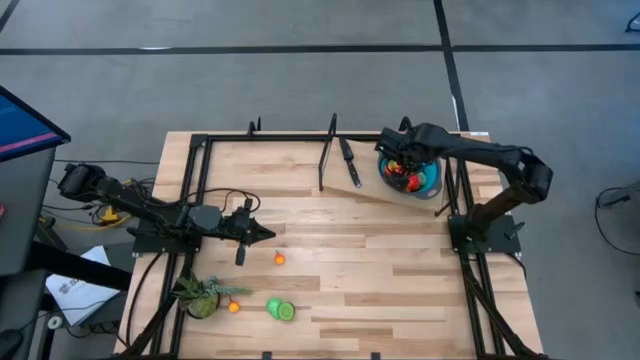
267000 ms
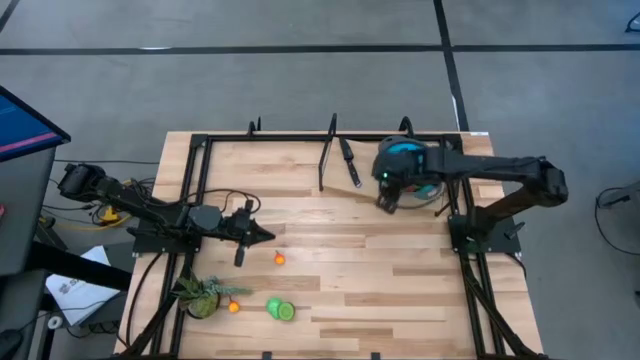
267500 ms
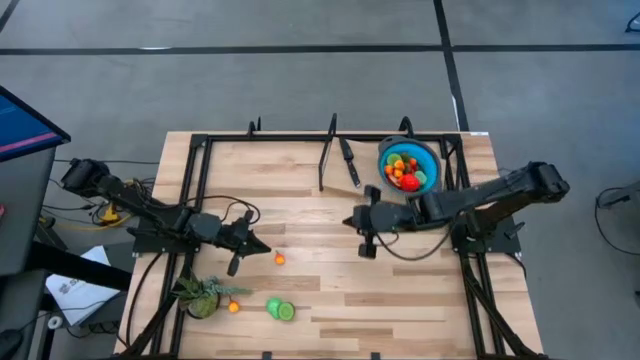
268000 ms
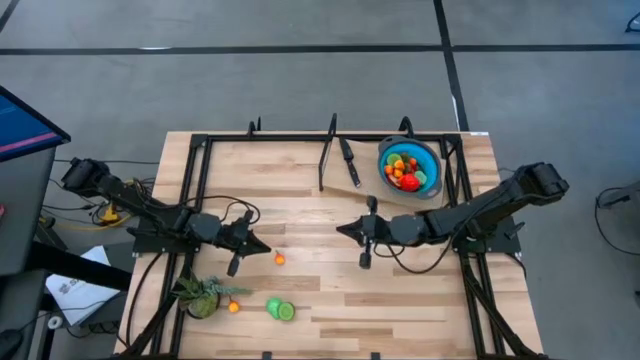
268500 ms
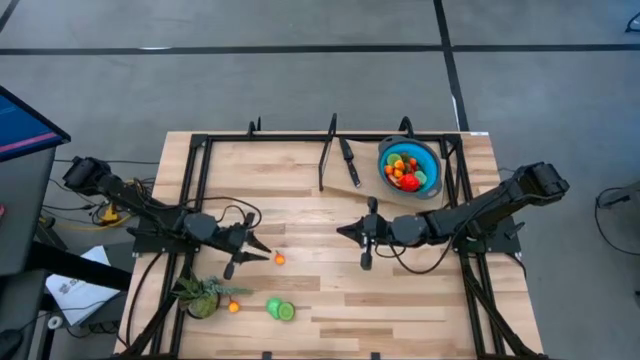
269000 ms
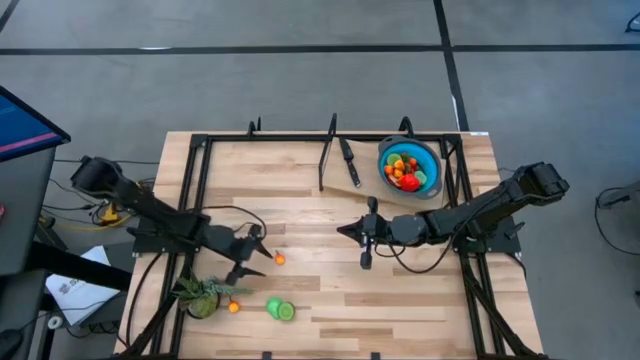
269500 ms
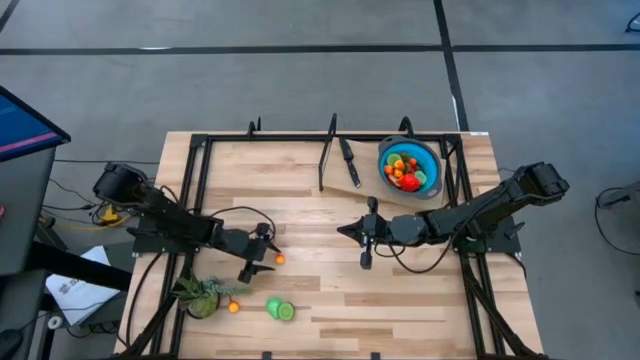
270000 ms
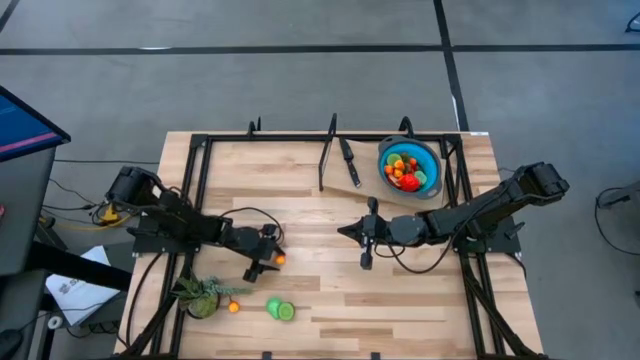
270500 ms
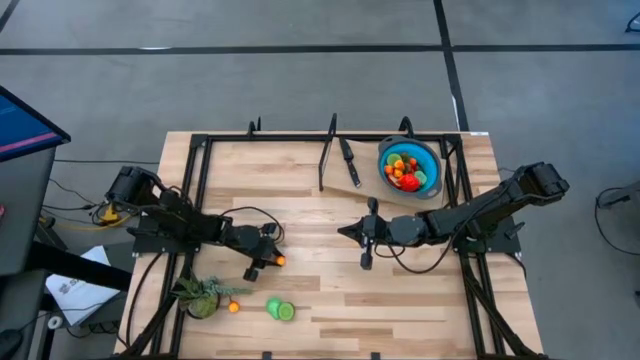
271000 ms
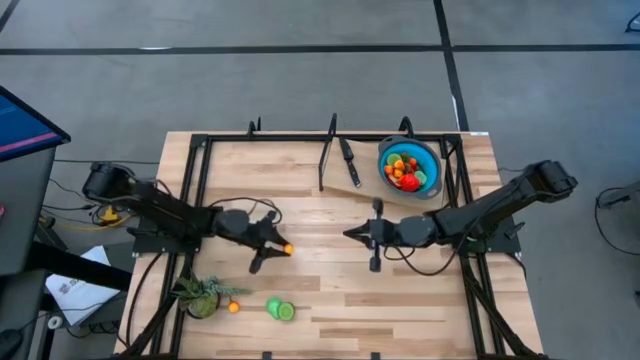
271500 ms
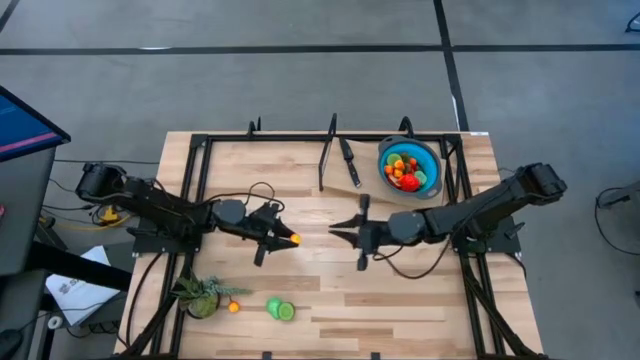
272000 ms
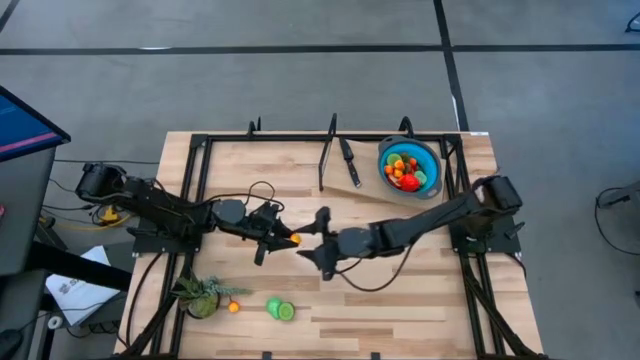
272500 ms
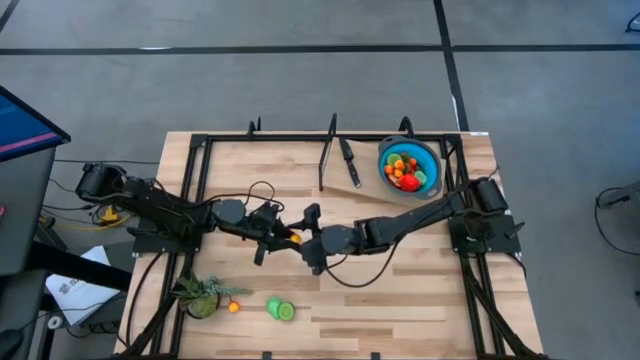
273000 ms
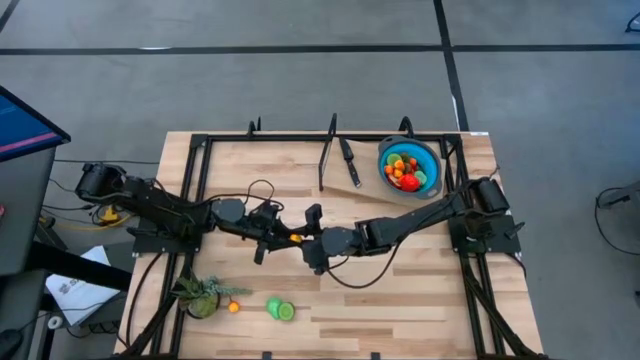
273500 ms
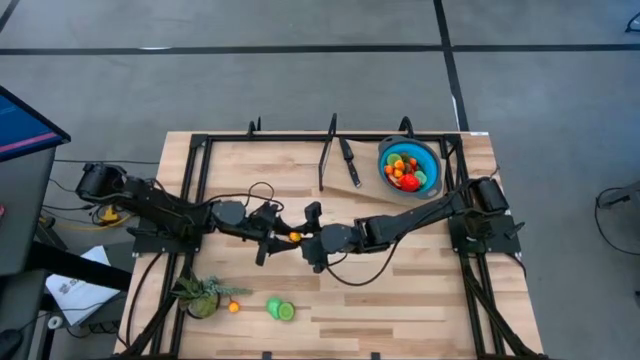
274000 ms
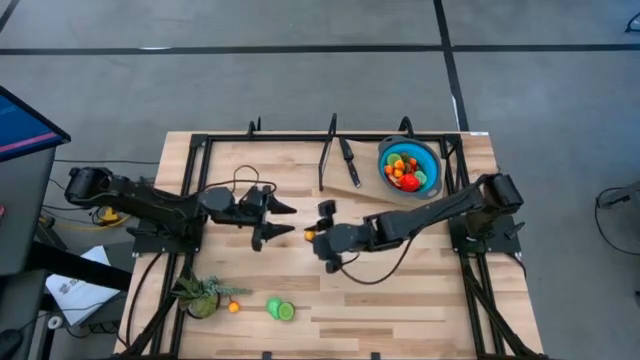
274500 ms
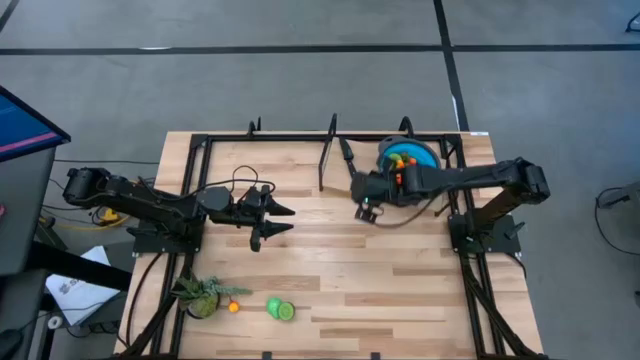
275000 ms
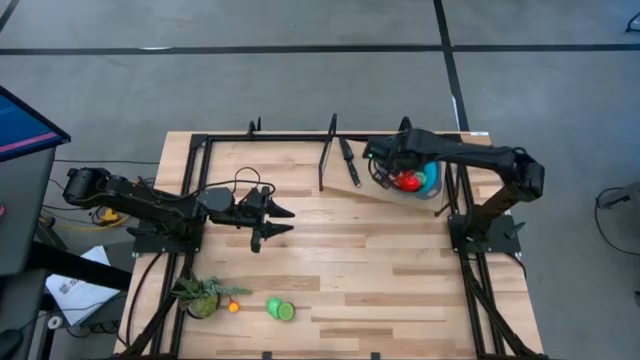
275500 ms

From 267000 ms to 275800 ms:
Task: Pick & Place Fruit
Put the orange pear into the blue colander

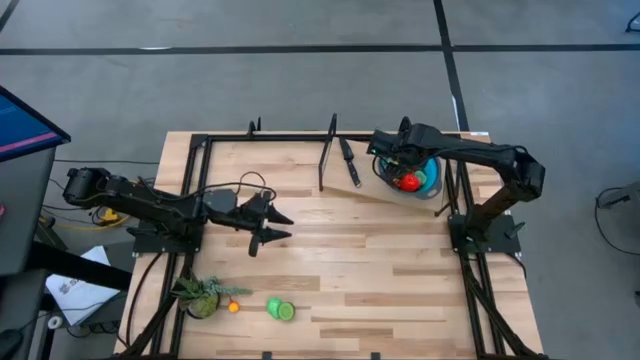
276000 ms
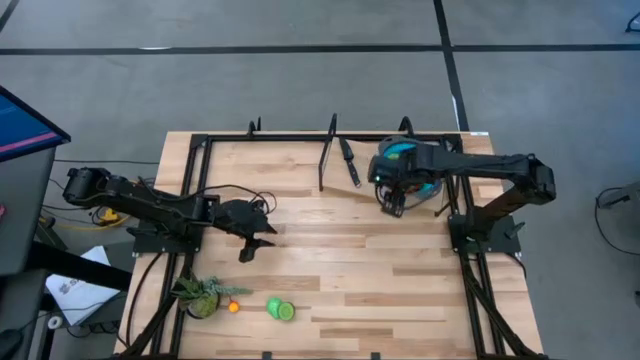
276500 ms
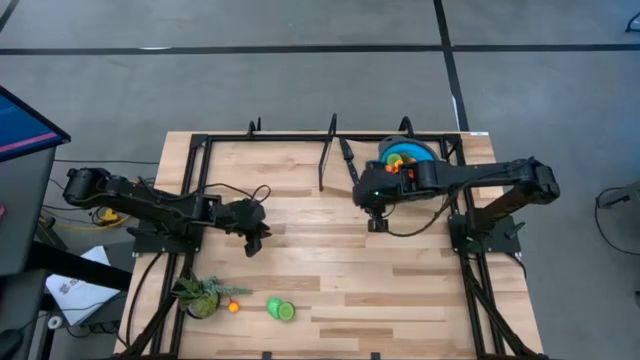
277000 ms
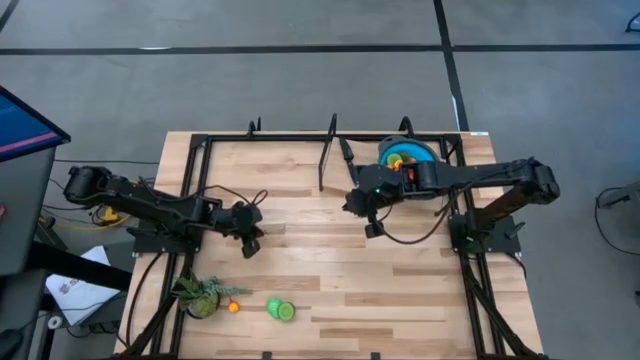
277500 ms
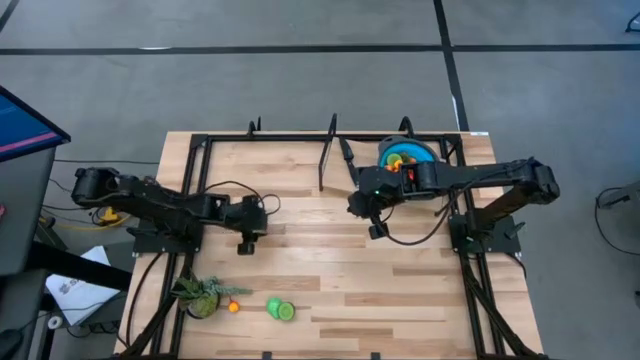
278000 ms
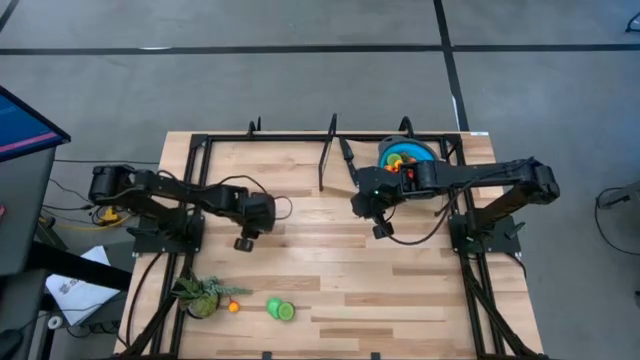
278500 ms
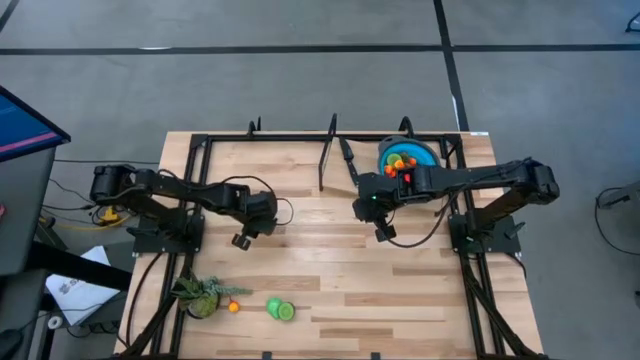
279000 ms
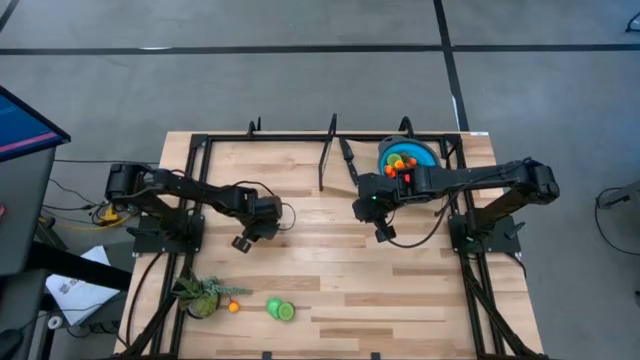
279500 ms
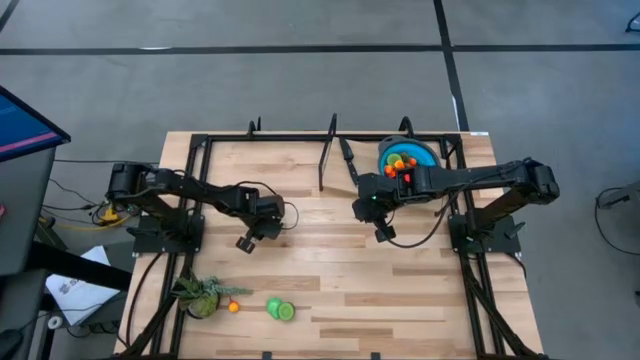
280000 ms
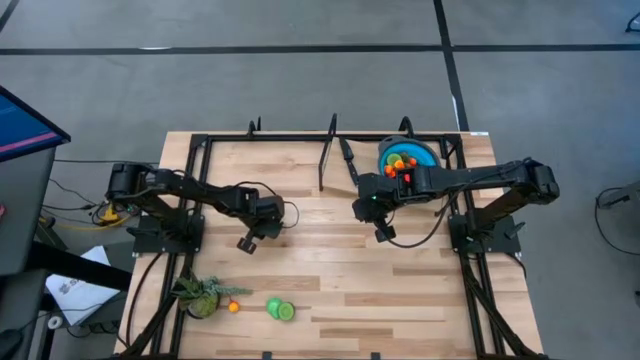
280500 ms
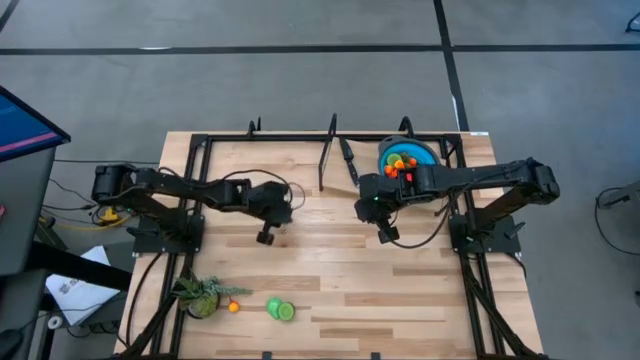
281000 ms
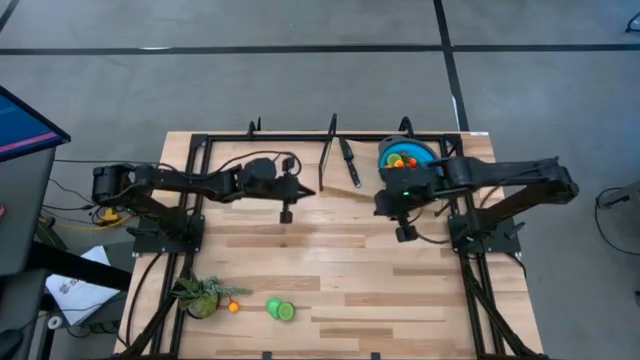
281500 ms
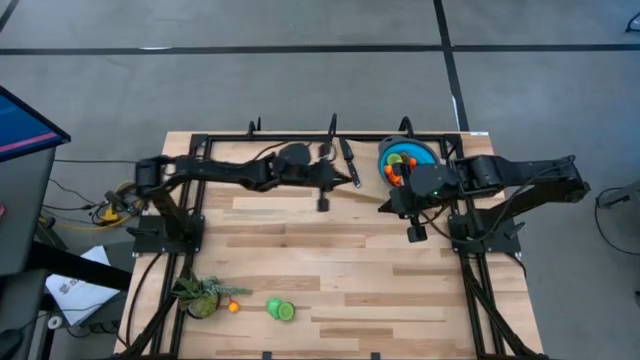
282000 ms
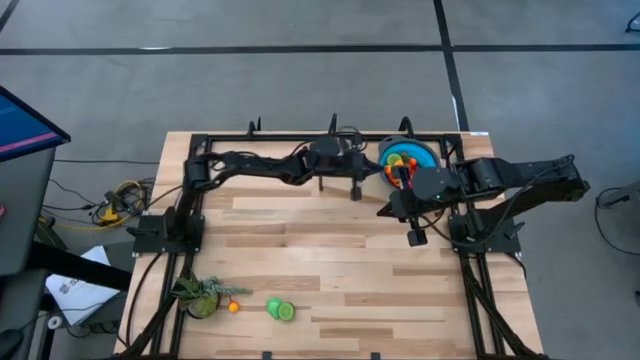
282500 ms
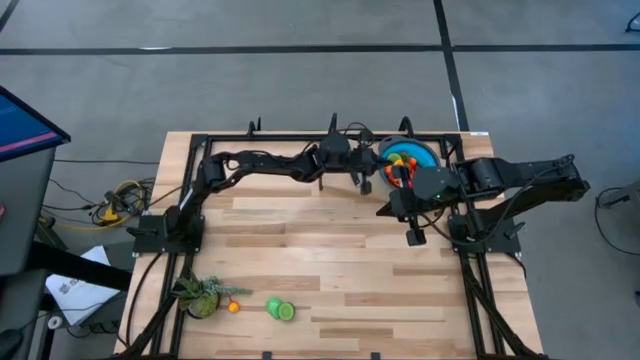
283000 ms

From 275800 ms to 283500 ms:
Put the fruit stalk into the blue colander

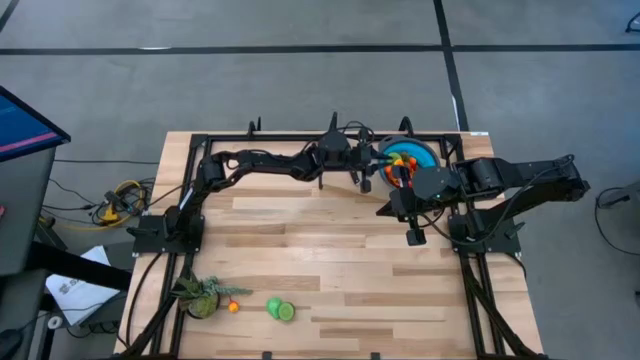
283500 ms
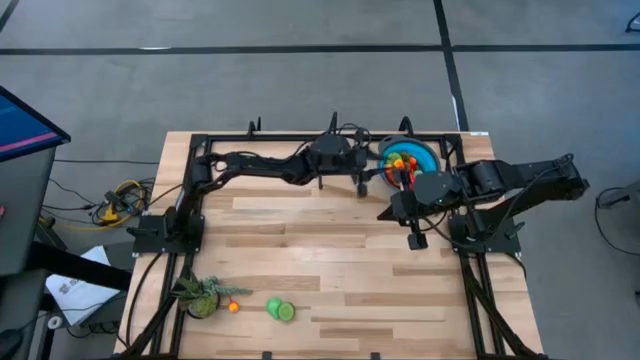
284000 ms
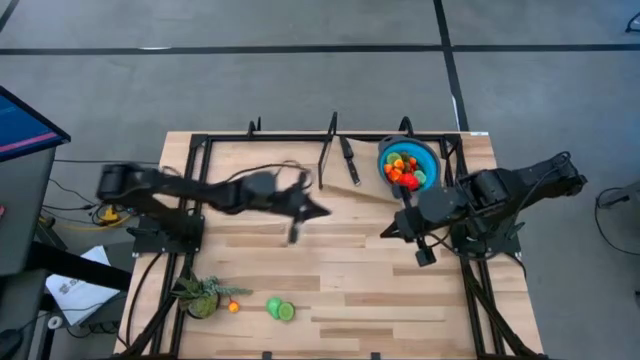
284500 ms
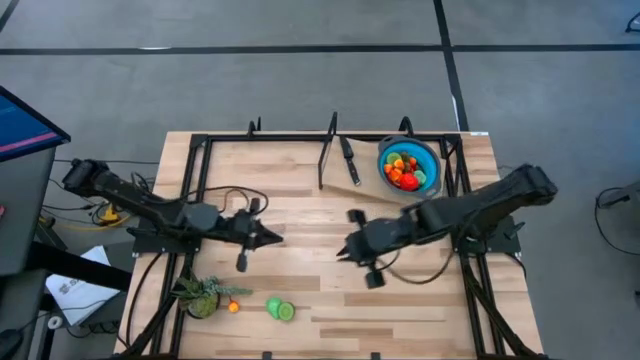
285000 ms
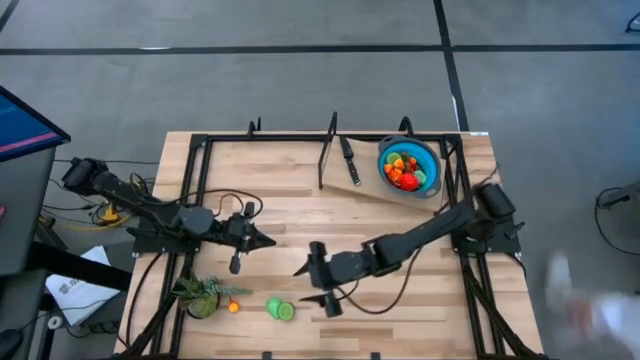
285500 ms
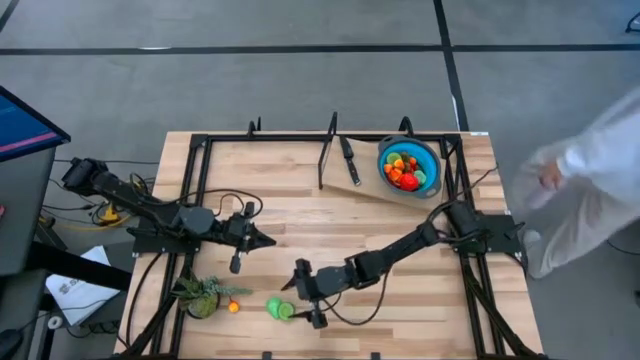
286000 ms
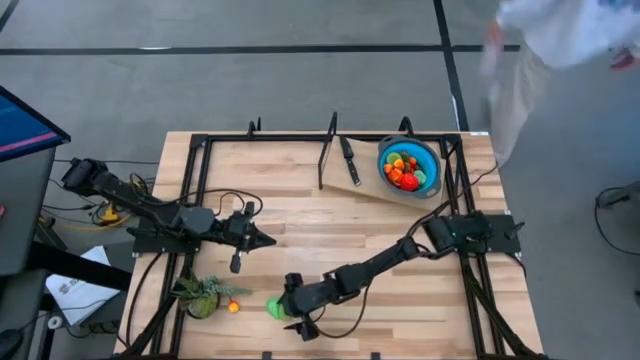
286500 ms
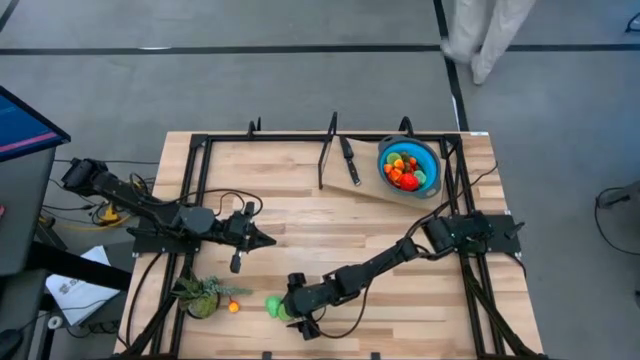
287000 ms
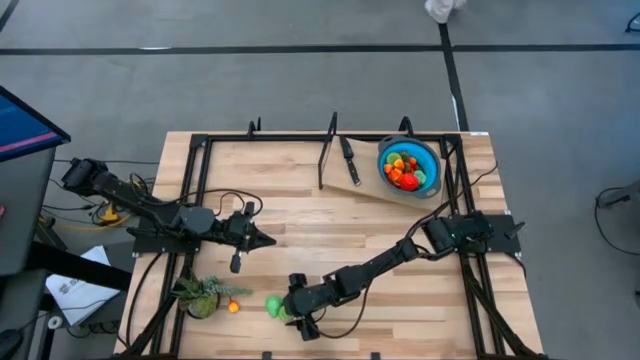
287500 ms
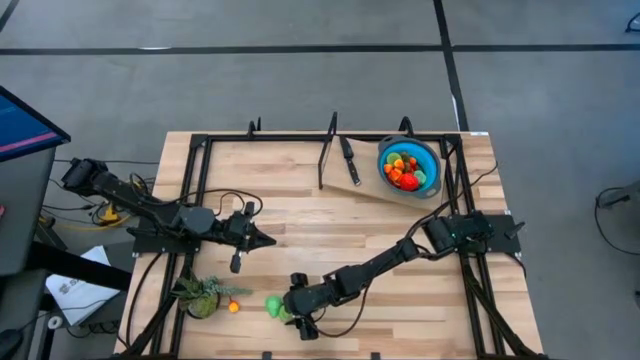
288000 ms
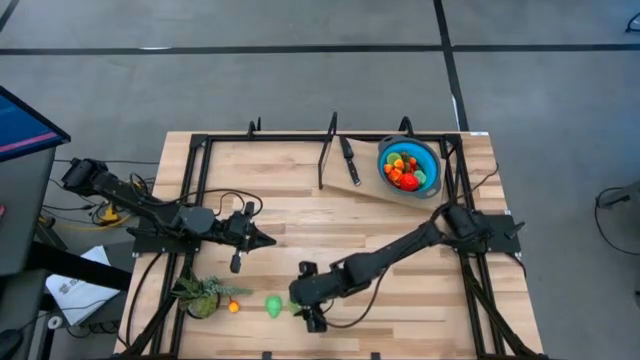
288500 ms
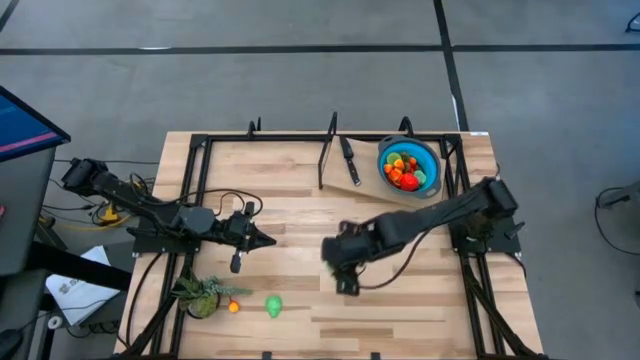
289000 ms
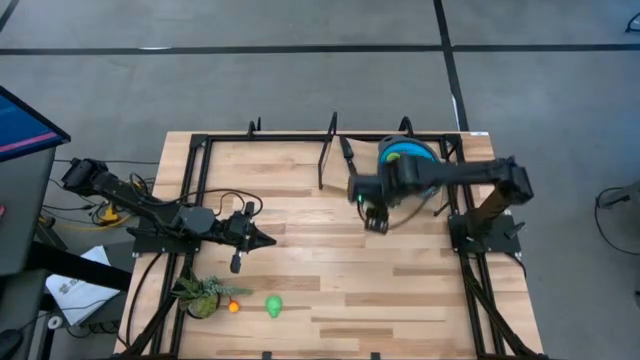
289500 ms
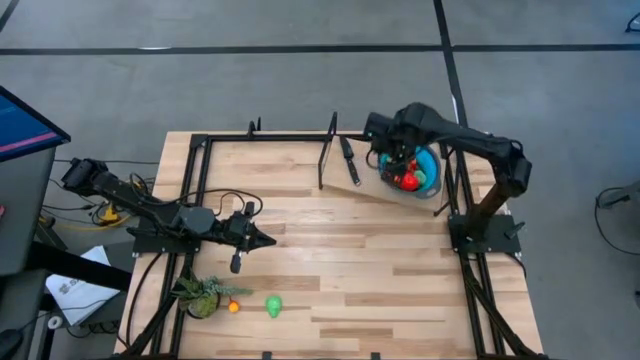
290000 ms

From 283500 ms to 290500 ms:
Put the half brown kiwi into the blue colander
